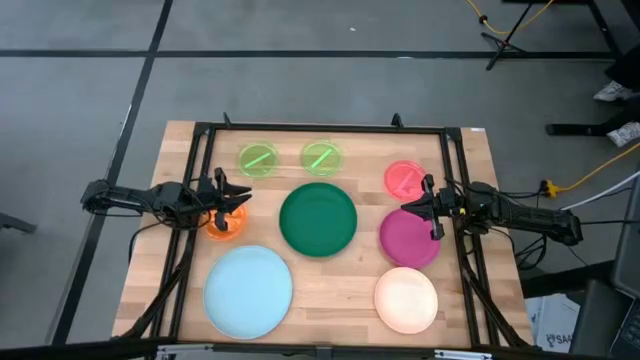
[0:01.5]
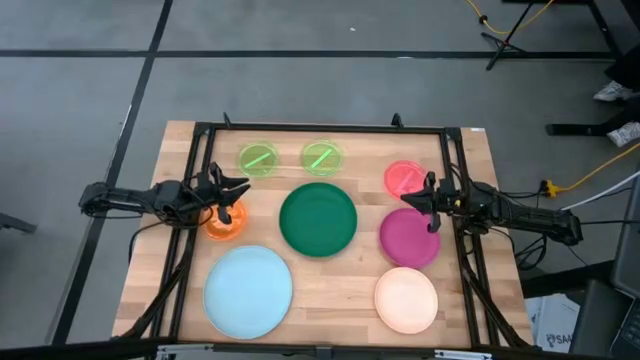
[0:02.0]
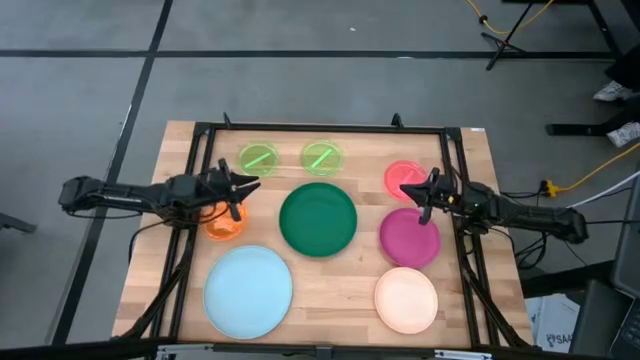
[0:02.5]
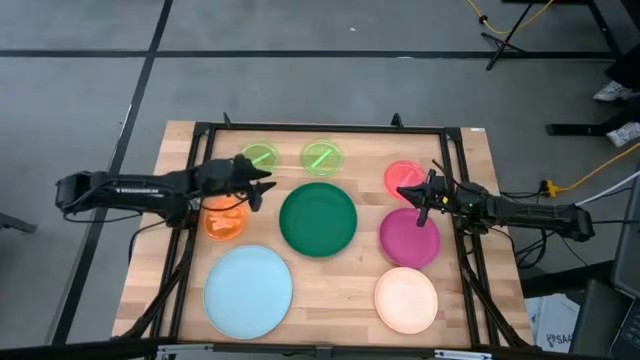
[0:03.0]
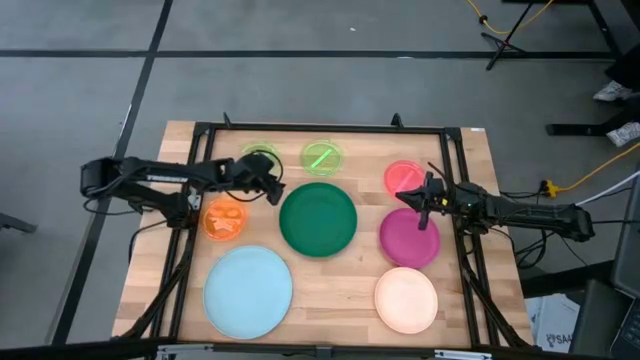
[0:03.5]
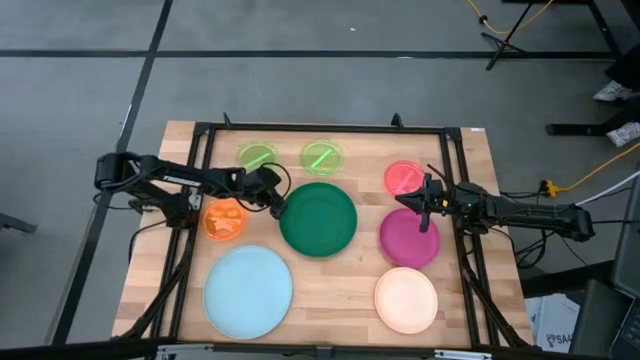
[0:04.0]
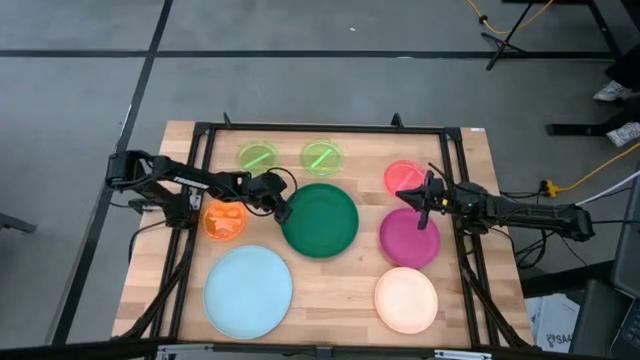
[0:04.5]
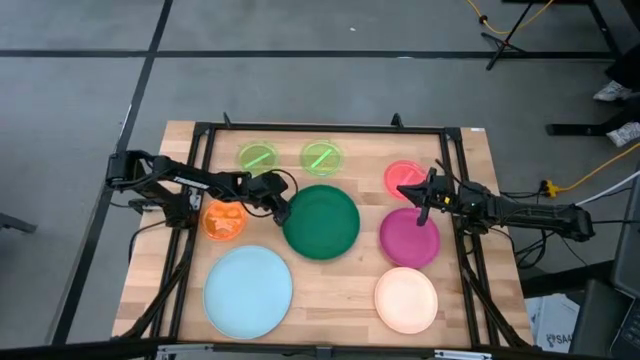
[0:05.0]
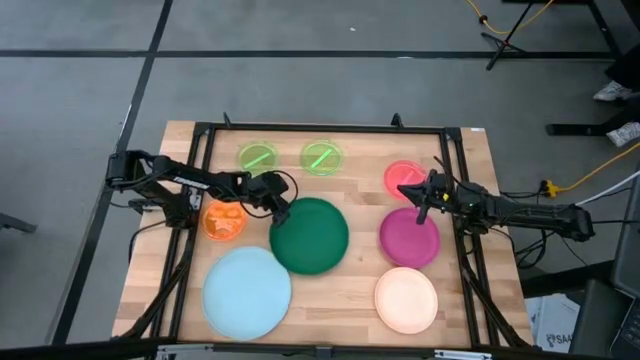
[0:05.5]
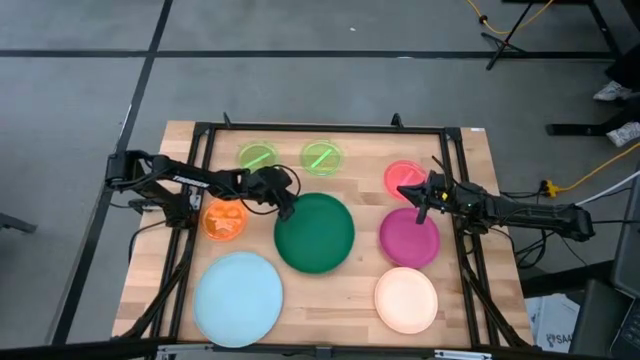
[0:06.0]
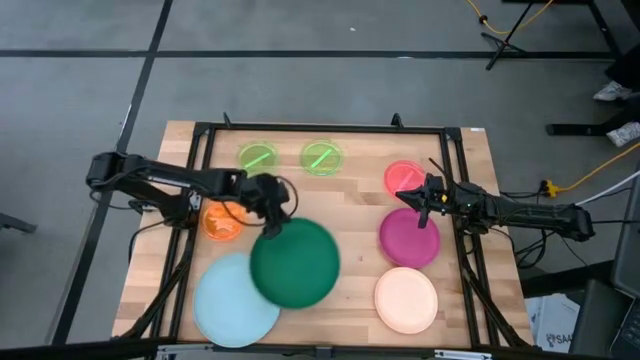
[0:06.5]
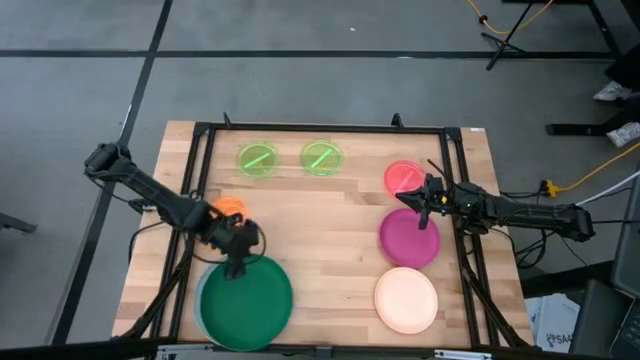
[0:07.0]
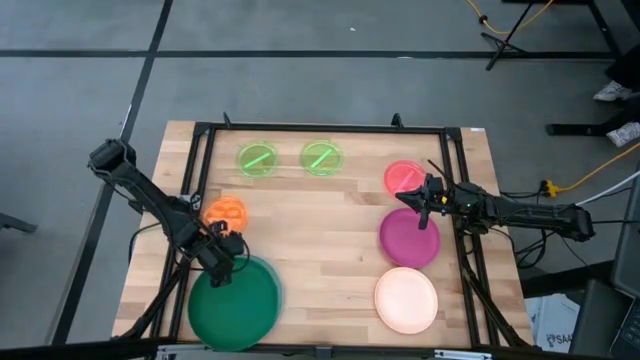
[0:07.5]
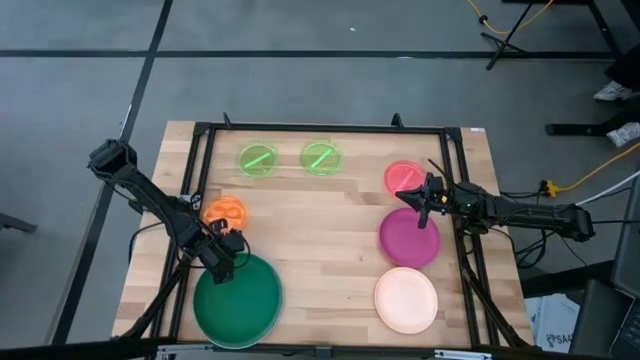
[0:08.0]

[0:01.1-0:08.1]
Task: Stack plastic plates
Stack the dark green plate on top of the blue plate

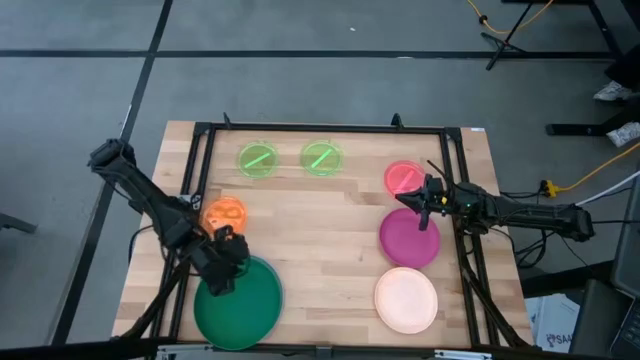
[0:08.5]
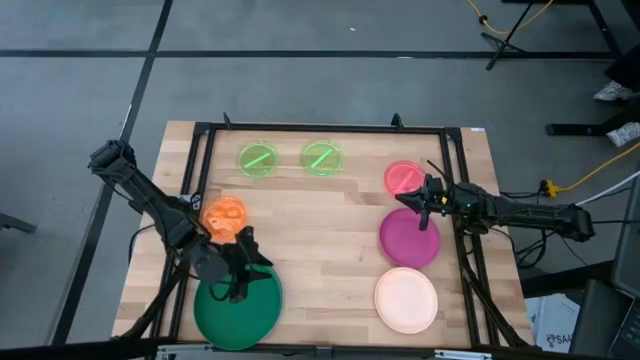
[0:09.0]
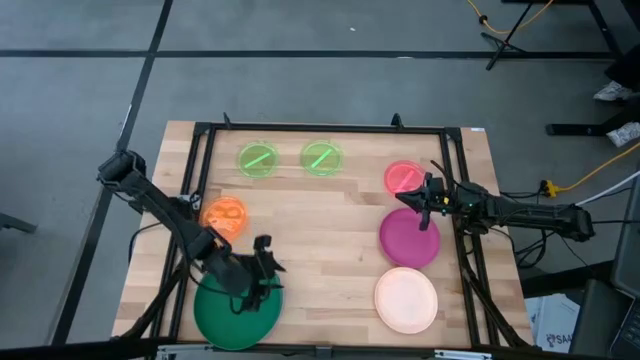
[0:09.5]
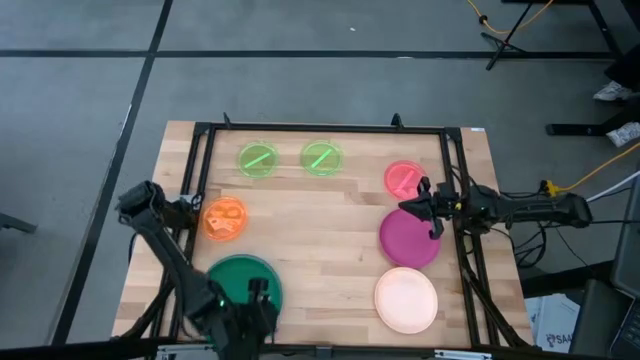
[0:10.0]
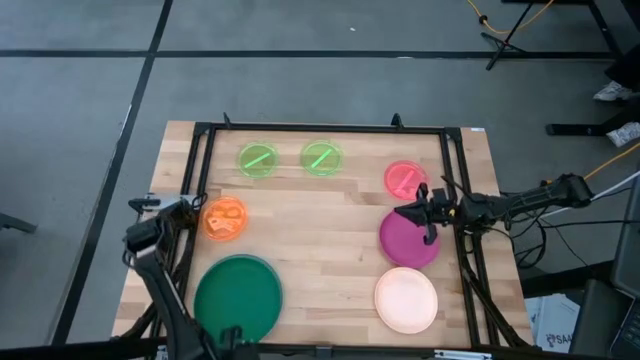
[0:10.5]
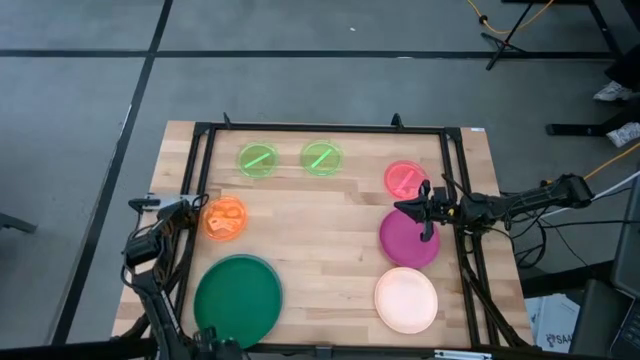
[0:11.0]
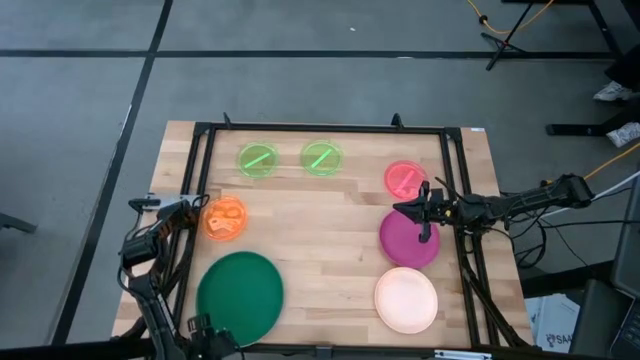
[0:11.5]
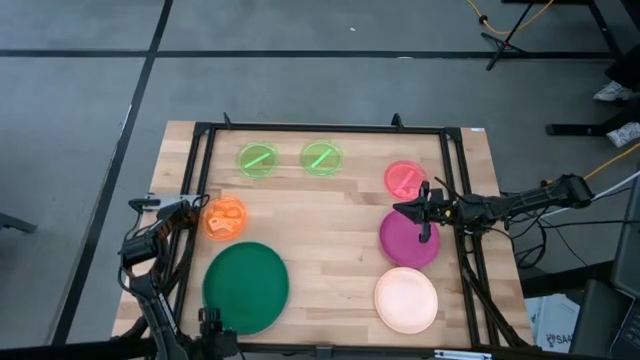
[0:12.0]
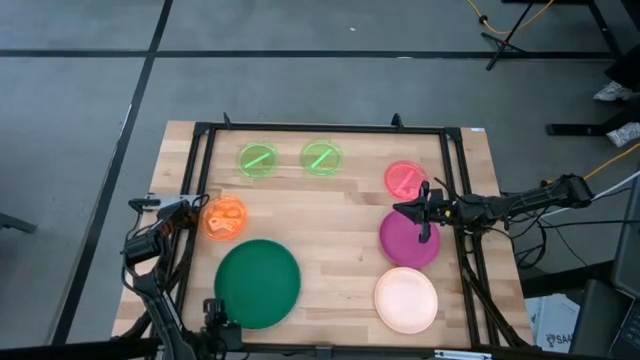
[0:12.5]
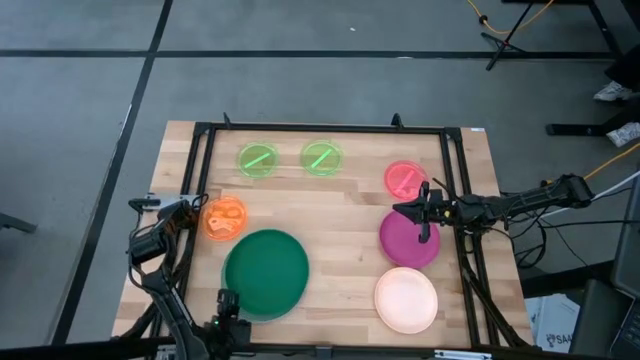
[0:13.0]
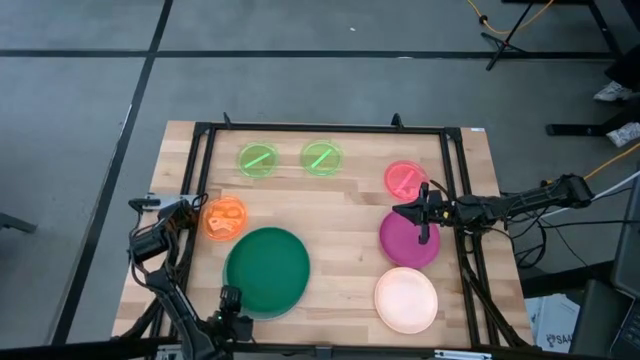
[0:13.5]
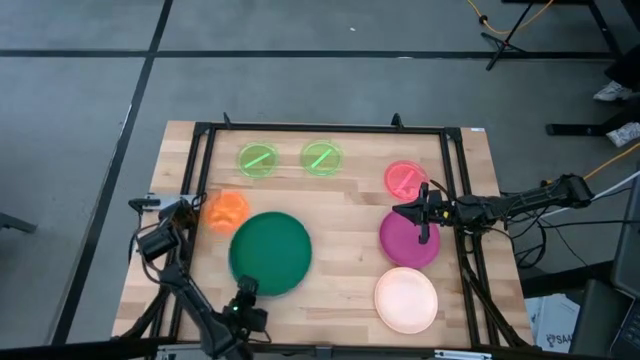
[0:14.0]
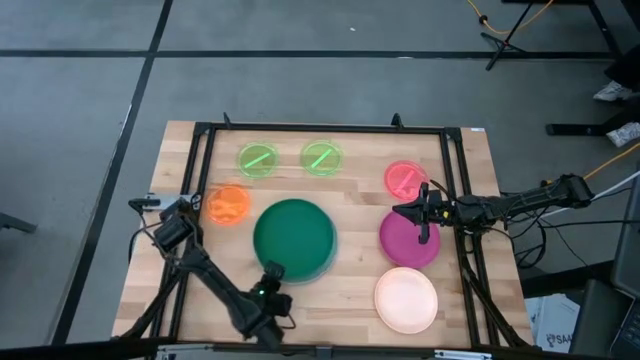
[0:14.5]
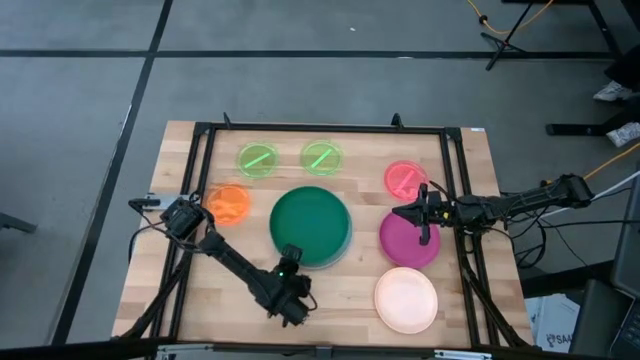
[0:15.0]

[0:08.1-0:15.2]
Move the stacked plates to the center of the table

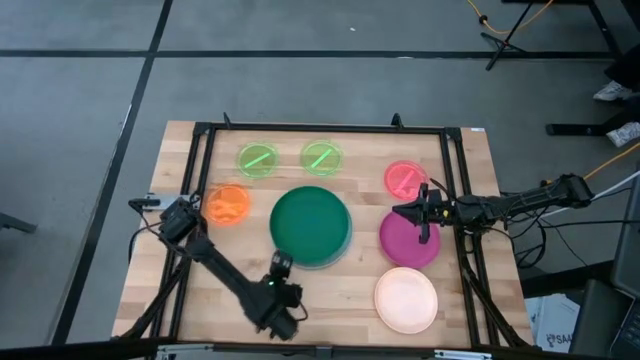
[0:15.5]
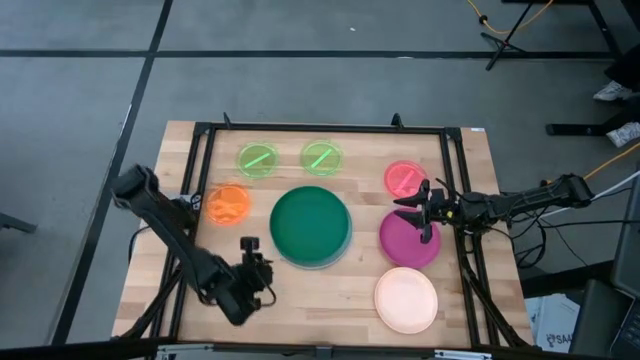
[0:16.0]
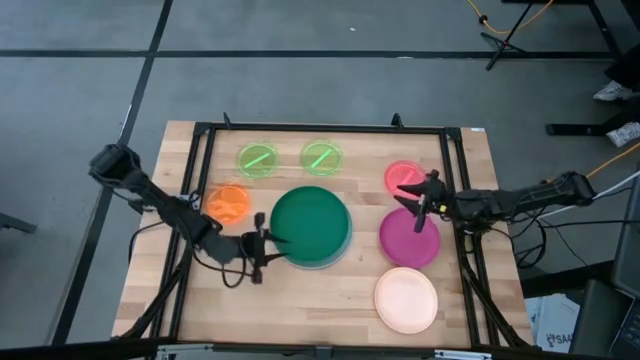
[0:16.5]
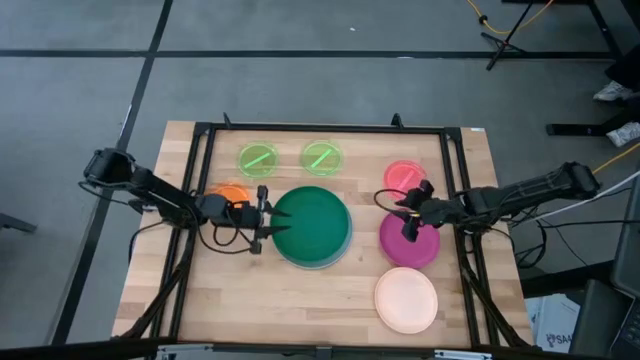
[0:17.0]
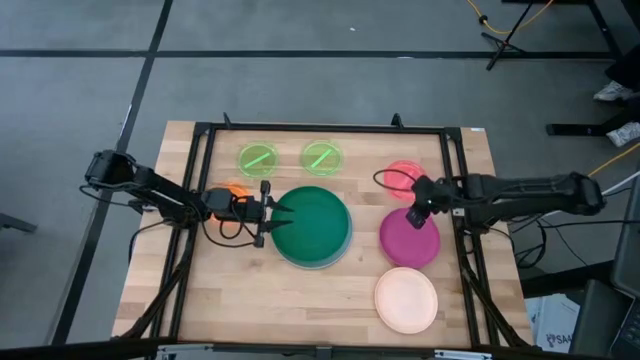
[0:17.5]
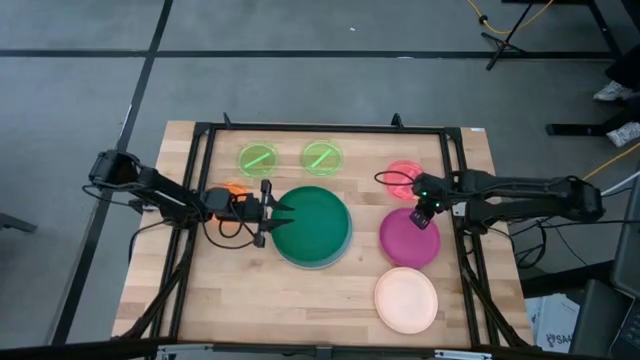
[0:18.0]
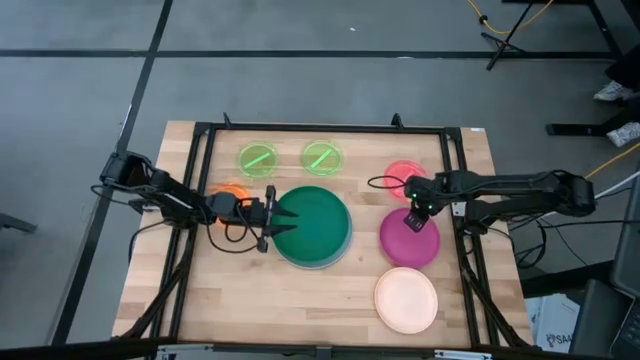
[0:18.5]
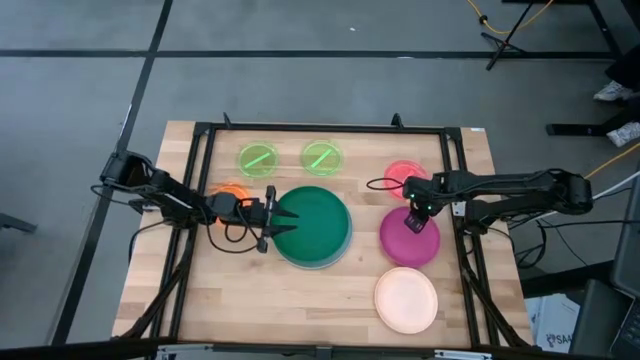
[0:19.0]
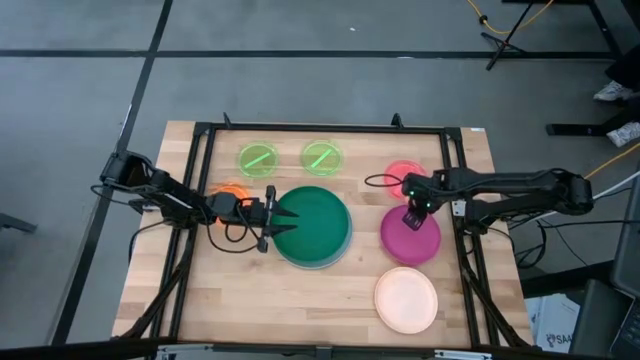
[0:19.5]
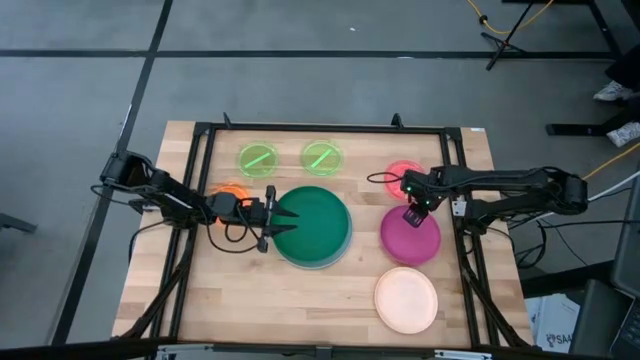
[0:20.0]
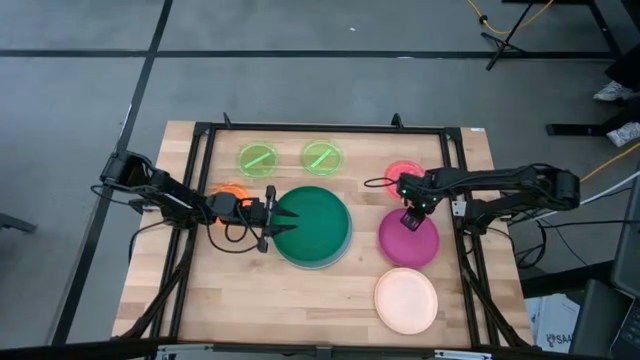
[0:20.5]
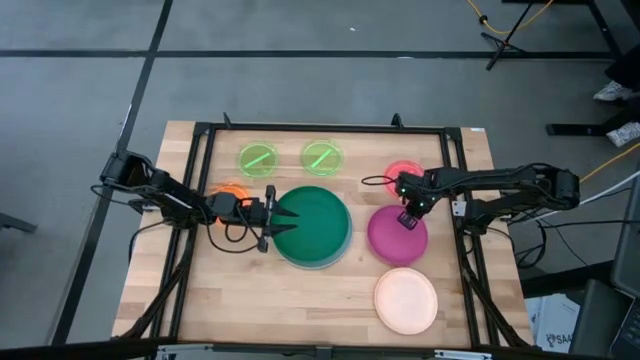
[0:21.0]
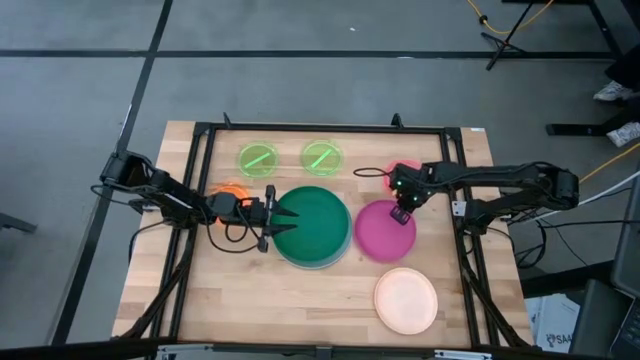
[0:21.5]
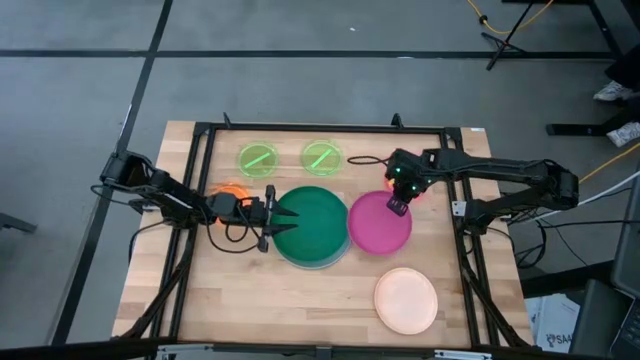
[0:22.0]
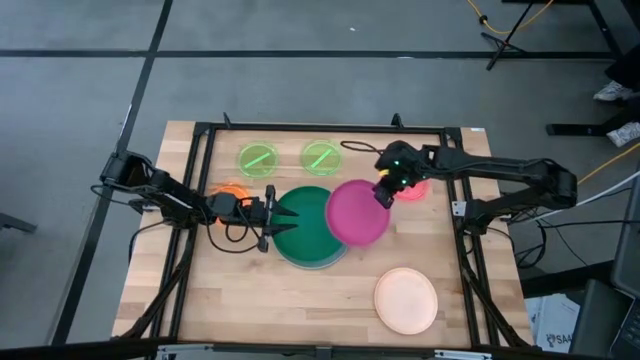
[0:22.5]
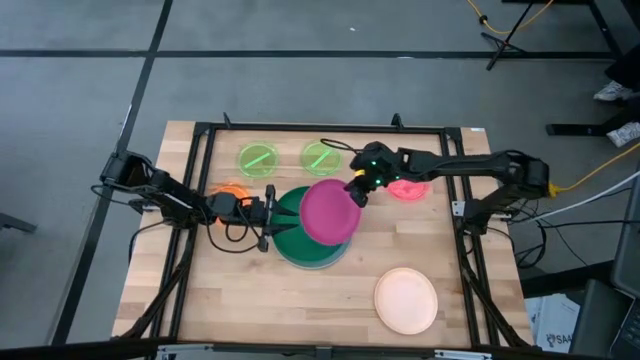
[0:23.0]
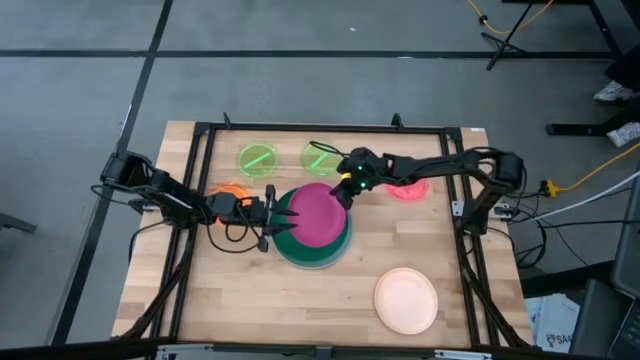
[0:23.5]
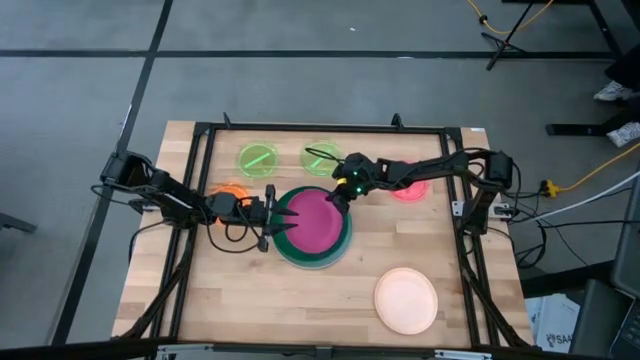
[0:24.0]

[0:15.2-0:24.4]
Stack the pink plate on top of the dark green plate
